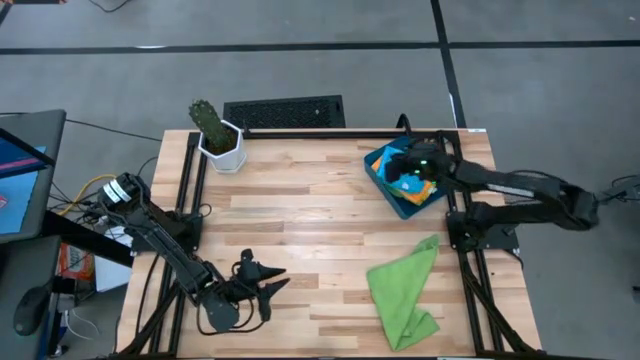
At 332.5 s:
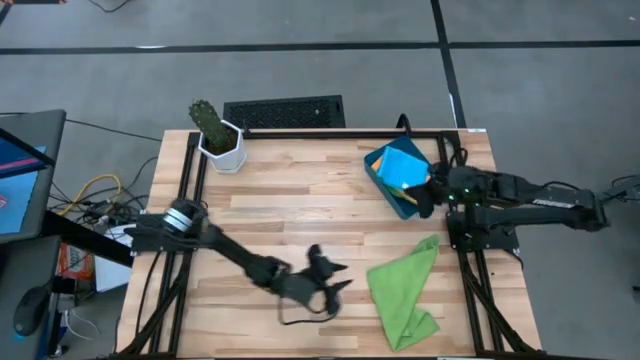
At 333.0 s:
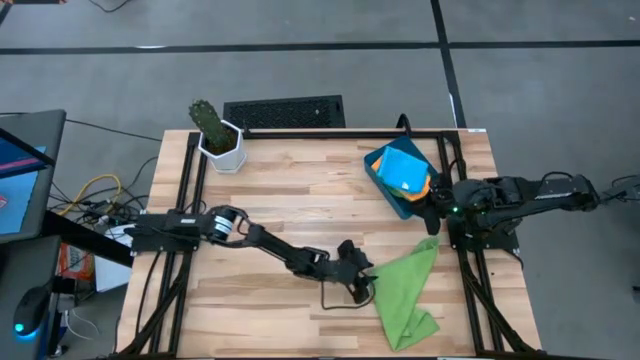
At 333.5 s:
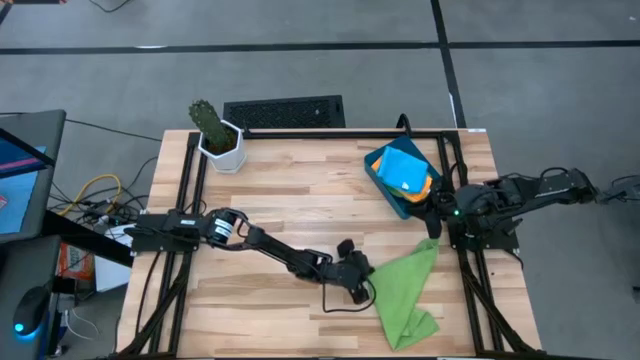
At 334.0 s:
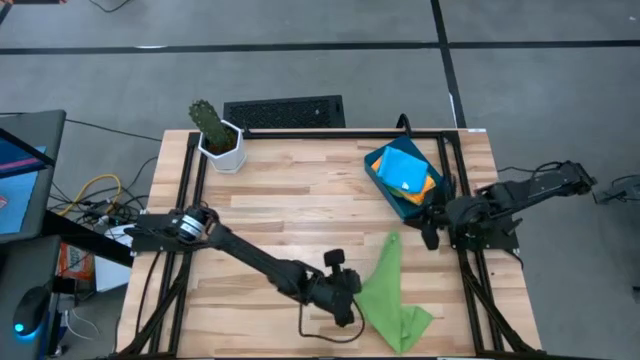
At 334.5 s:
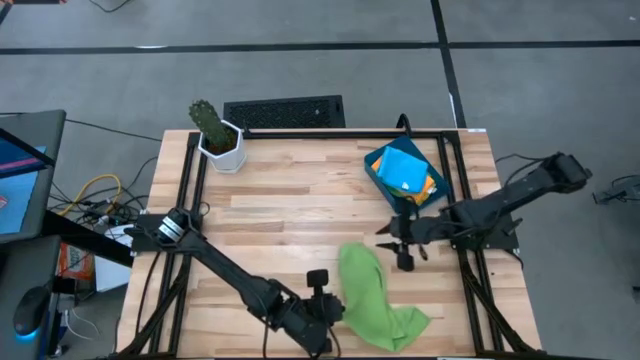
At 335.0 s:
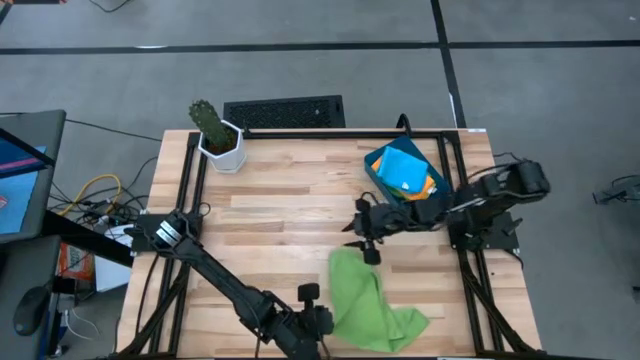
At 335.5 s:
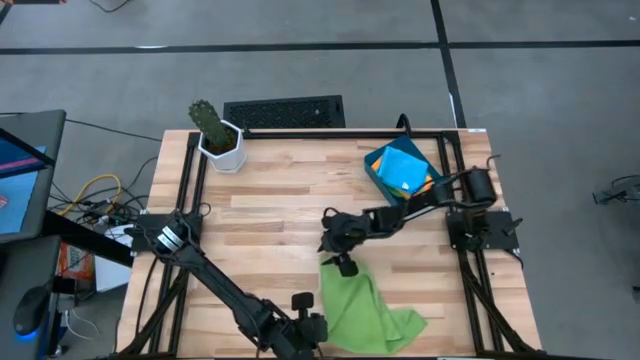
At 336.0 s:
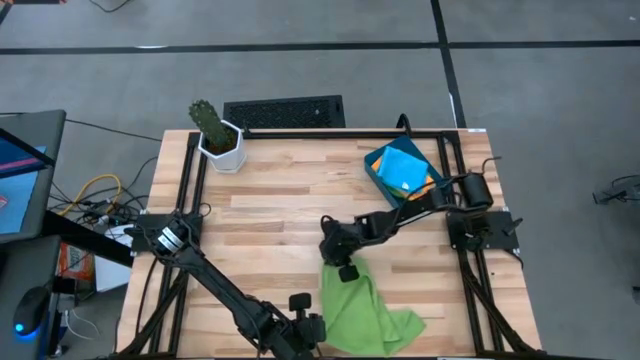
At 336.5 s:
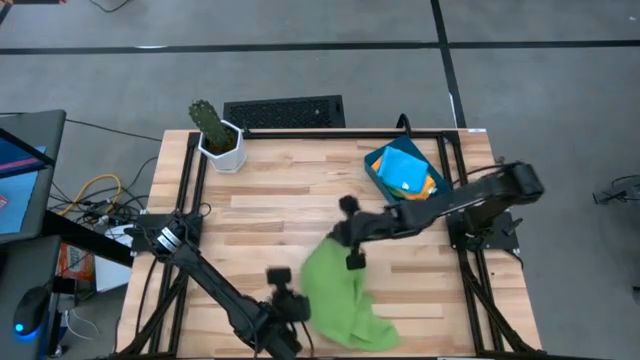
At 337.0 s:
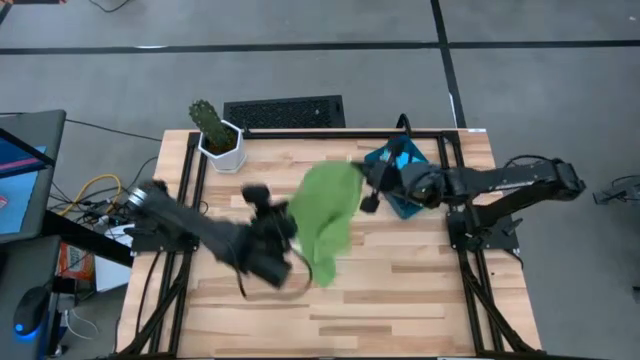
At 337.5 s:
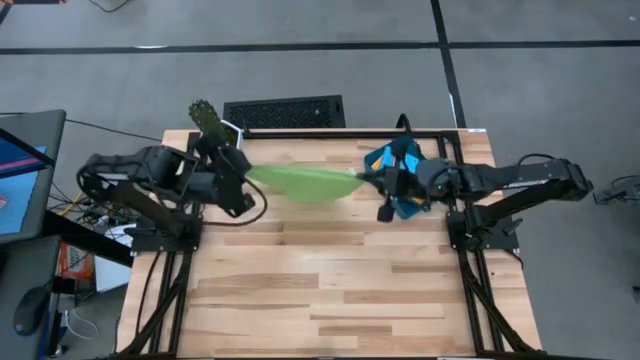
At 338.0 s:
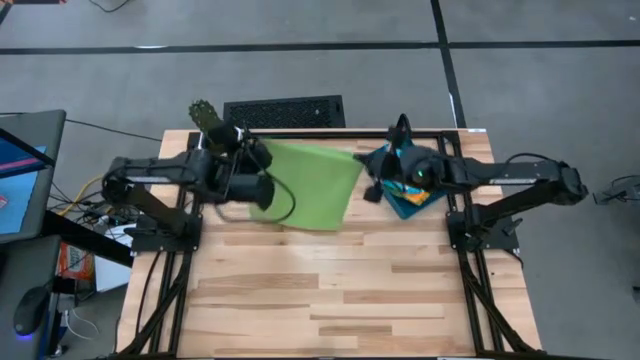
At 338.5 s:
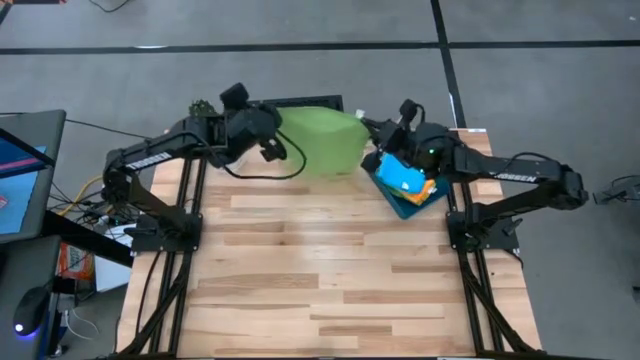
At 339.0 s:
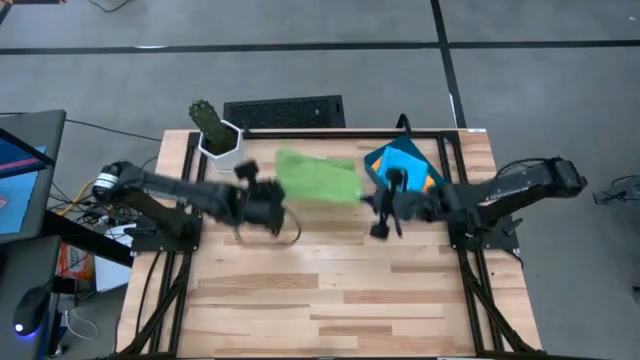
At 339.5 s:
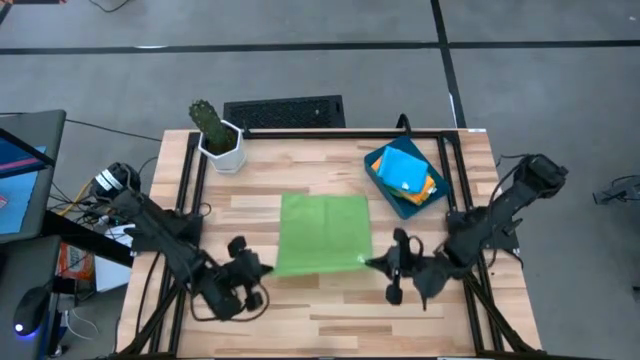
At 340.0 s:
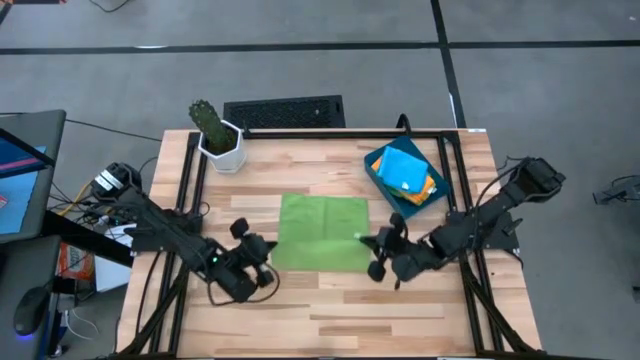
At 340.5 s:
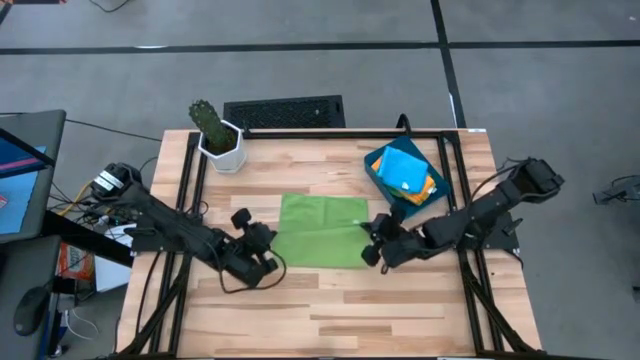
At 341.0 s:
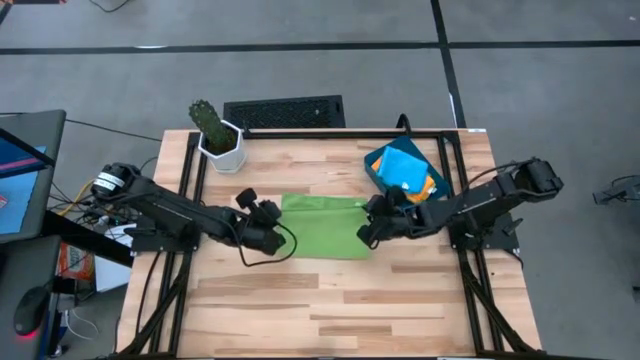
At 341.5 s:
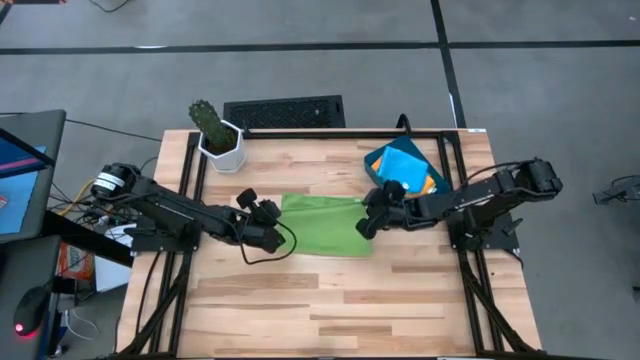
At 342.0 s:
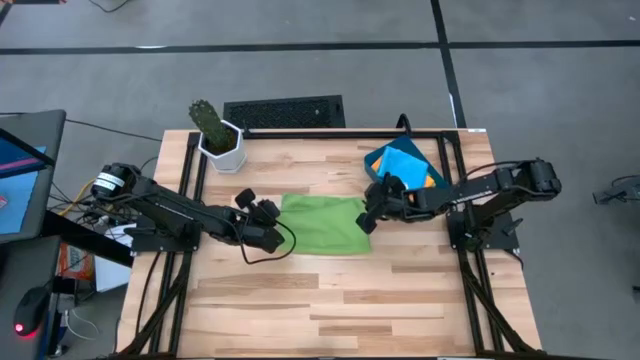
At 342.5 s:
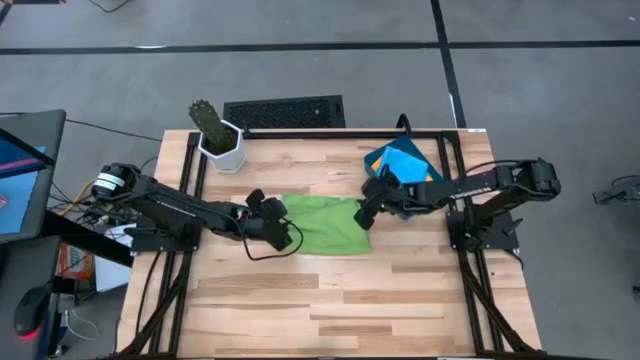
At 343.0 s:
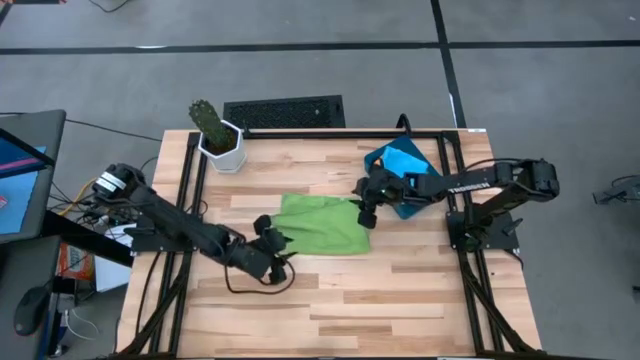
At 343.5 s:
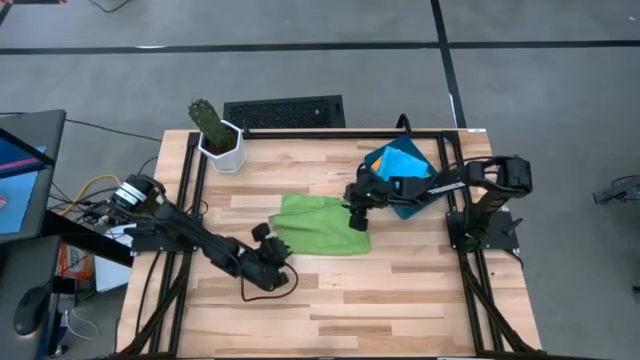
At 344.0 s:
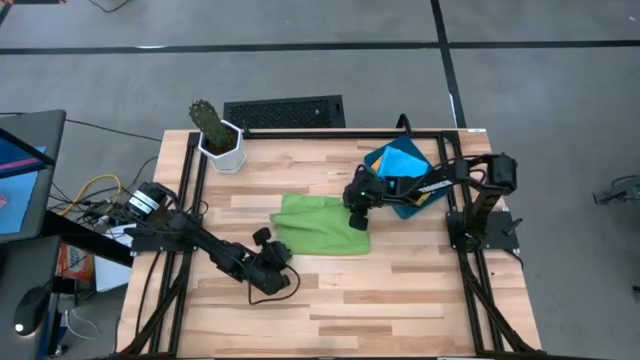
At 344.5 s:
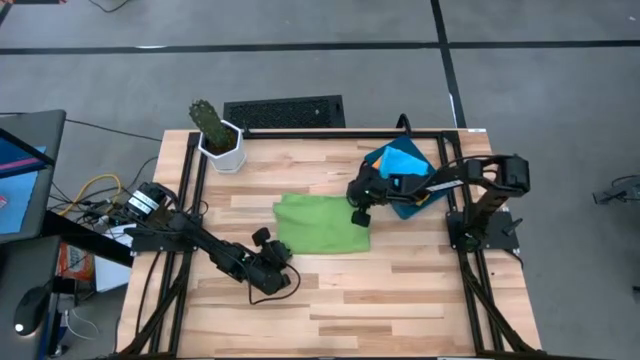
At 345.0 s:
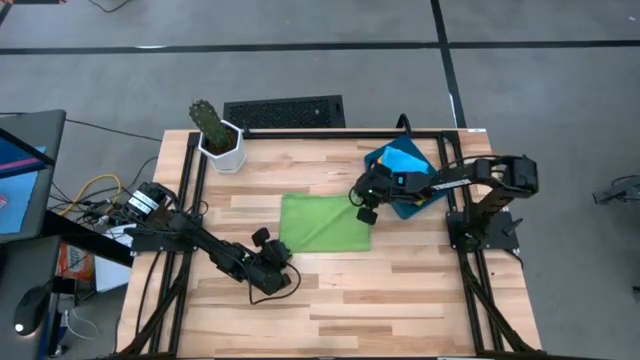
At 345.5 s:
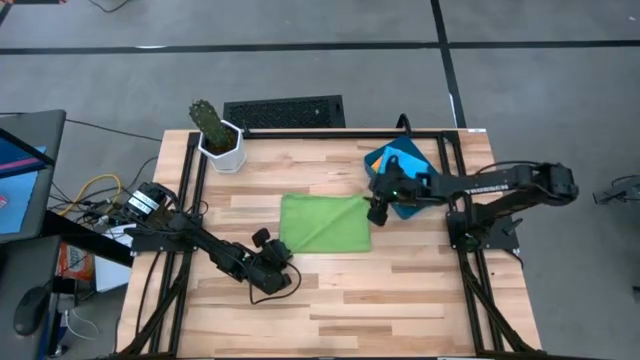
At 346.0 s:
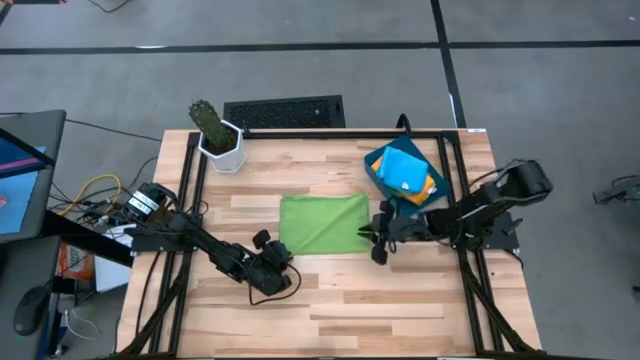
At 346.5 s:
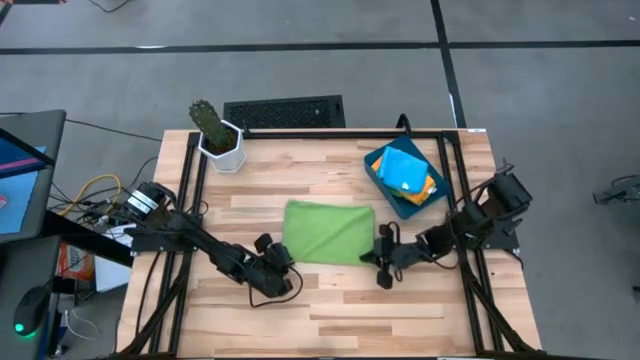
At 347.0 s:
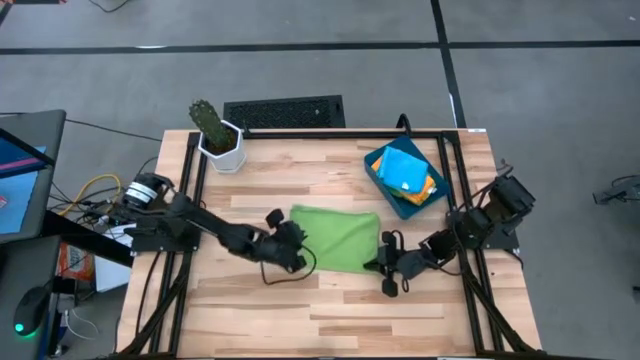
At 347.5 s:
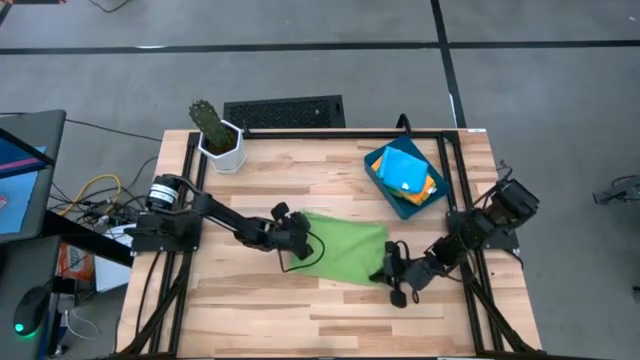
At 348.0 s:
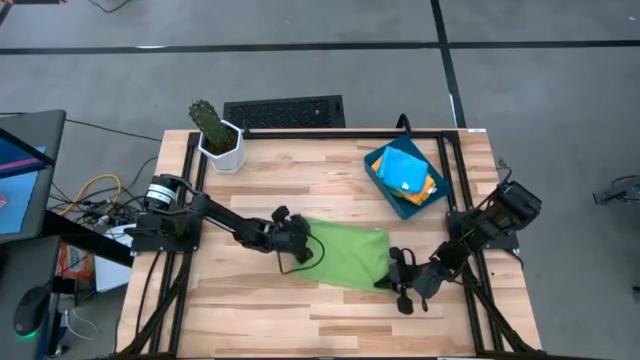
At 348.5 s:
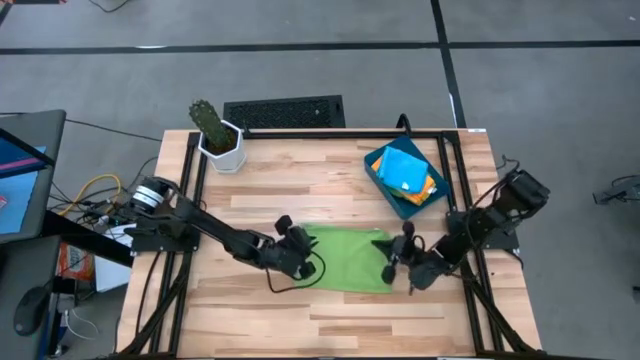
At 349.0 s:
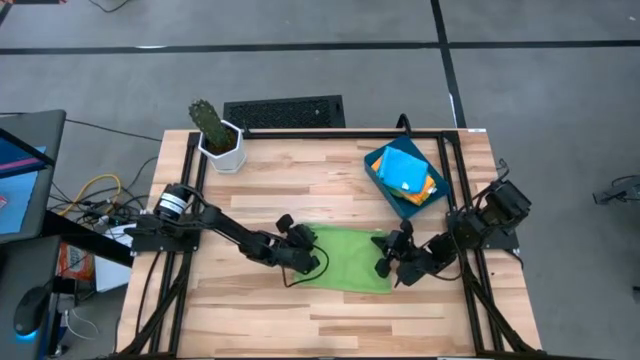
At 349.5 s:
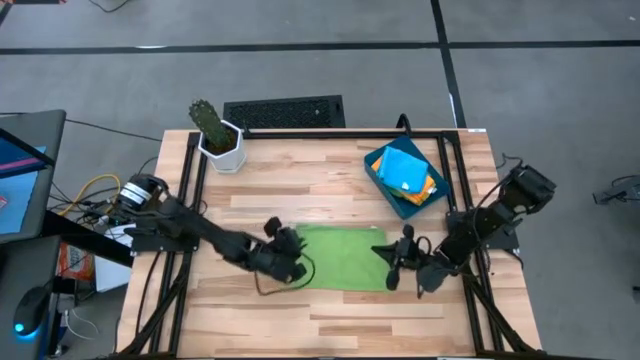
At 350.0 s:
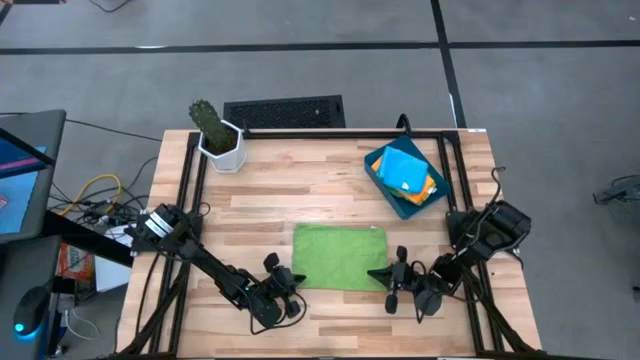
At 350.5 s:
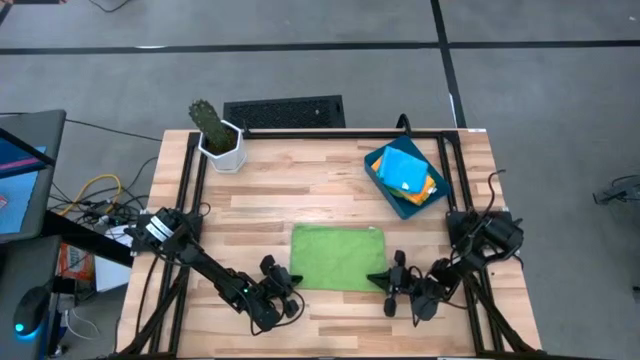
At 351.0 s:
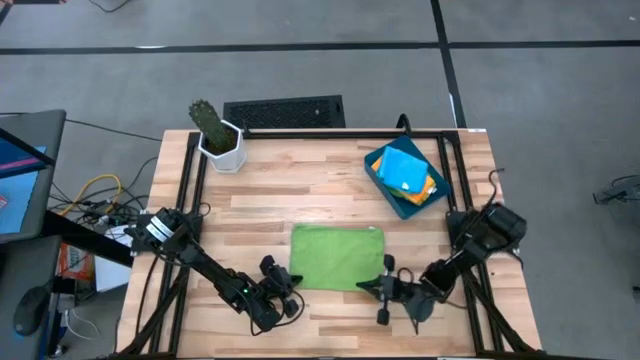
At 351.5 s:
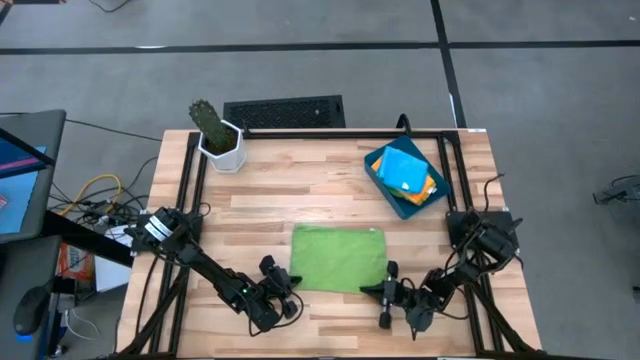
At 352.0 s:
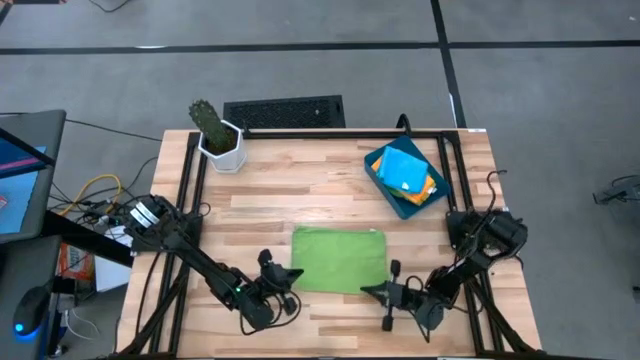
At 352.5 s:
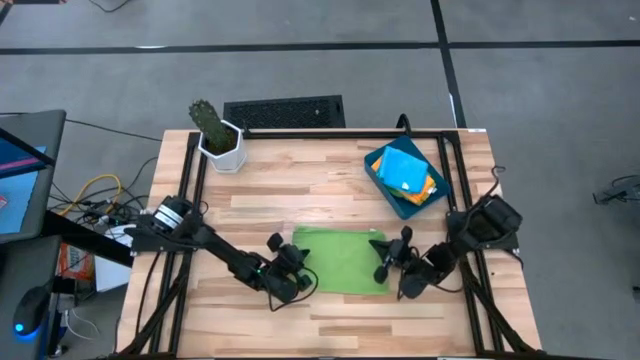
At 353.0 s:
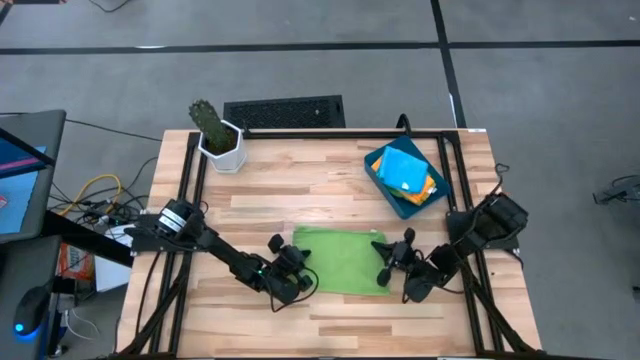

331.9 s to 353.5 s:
Task: Fold microfiber towels
Fold the green microfiber cloth
